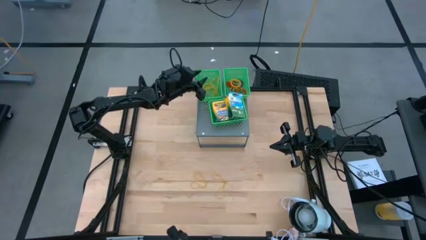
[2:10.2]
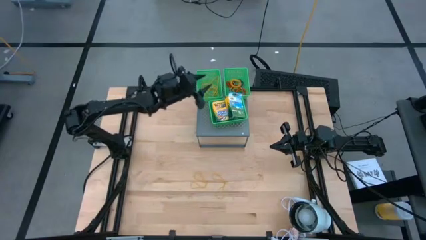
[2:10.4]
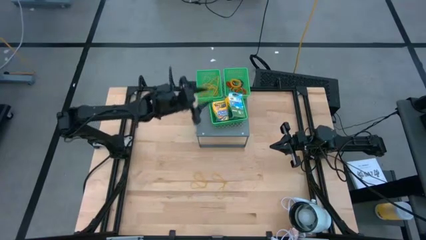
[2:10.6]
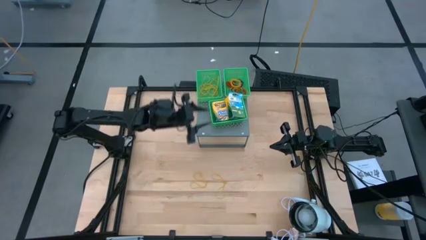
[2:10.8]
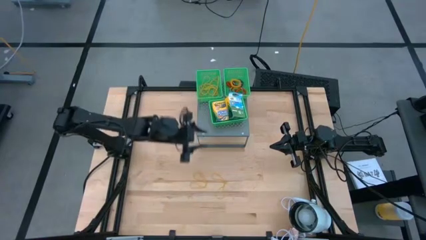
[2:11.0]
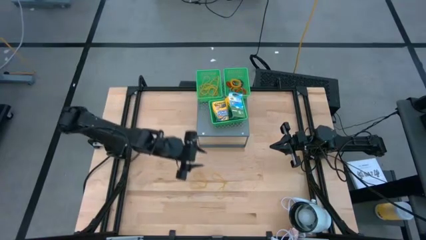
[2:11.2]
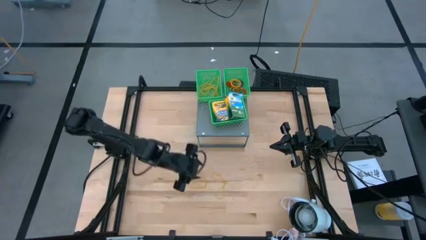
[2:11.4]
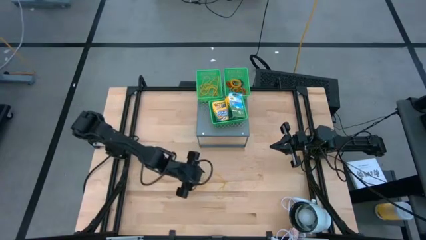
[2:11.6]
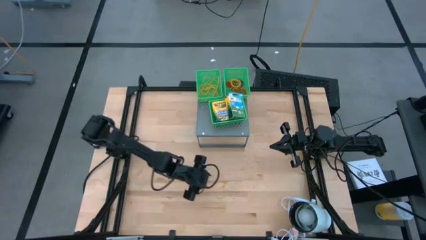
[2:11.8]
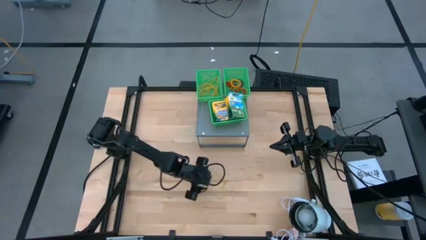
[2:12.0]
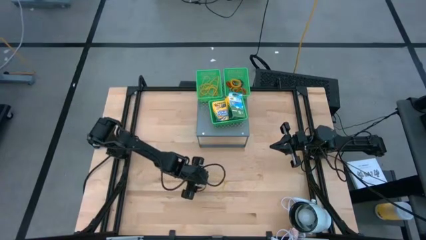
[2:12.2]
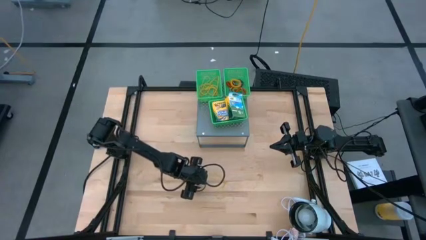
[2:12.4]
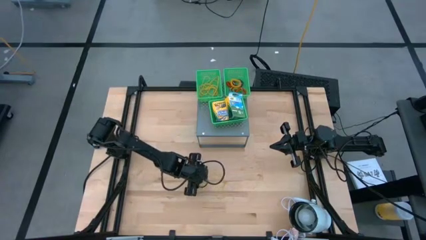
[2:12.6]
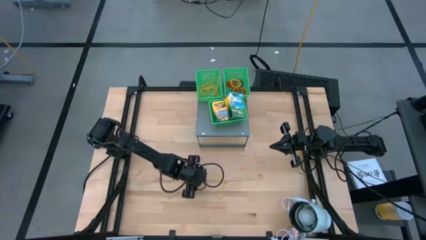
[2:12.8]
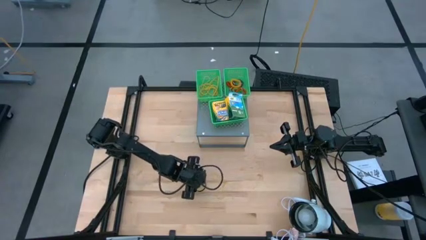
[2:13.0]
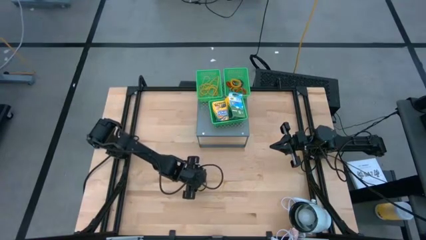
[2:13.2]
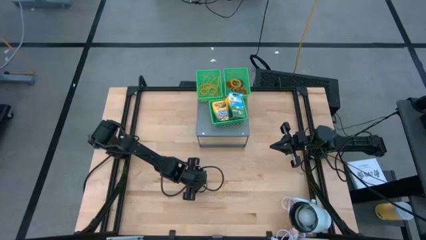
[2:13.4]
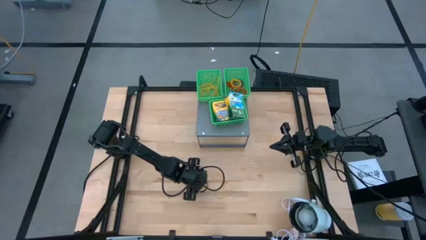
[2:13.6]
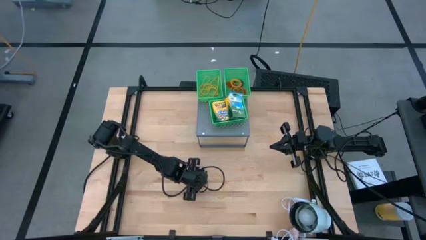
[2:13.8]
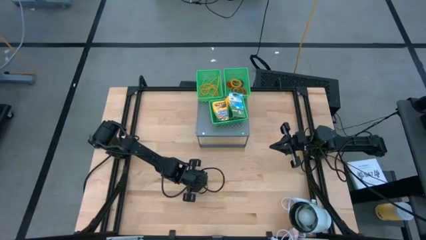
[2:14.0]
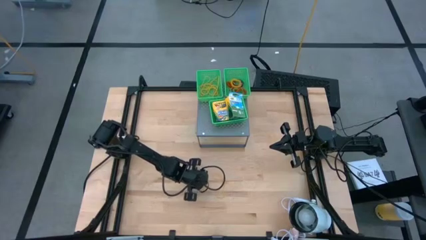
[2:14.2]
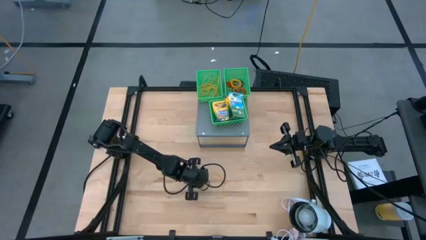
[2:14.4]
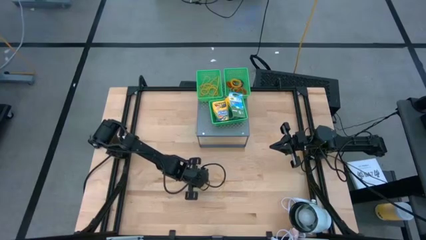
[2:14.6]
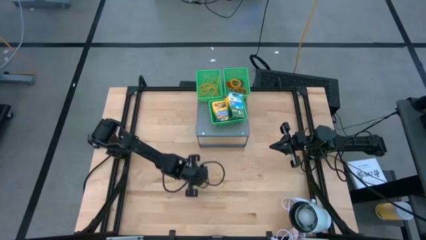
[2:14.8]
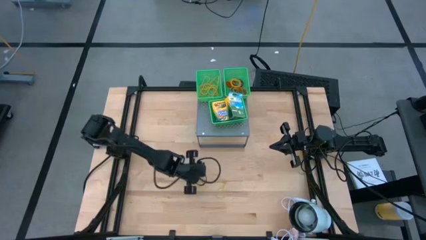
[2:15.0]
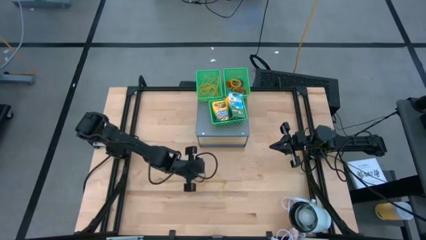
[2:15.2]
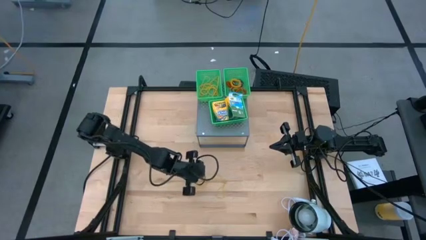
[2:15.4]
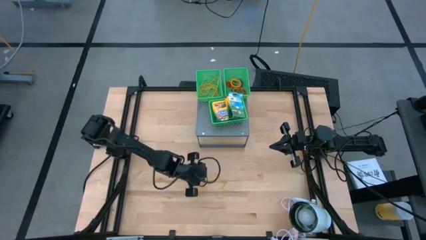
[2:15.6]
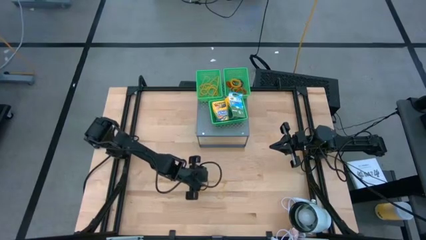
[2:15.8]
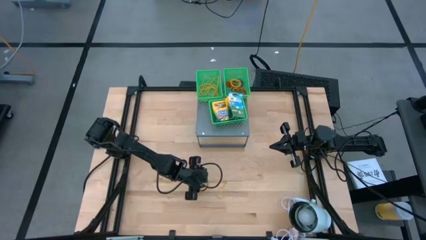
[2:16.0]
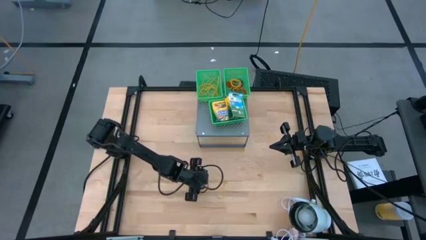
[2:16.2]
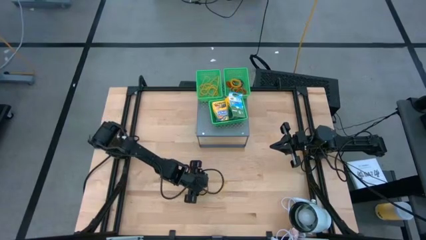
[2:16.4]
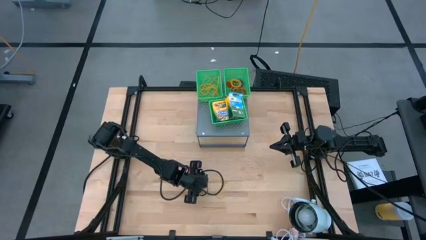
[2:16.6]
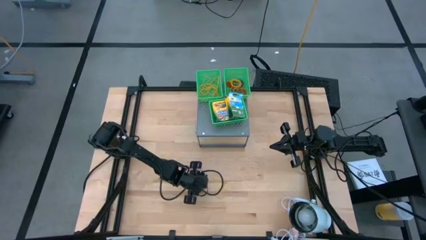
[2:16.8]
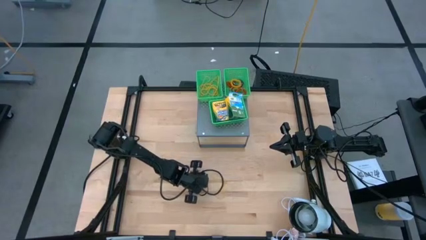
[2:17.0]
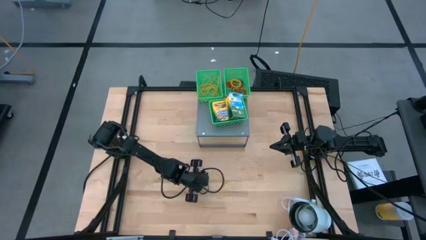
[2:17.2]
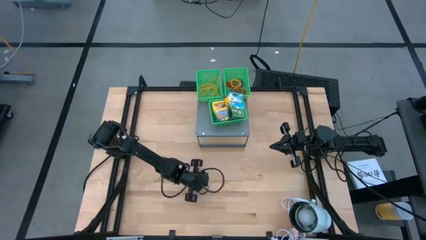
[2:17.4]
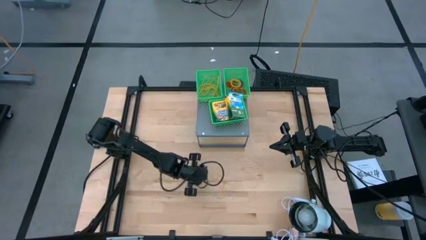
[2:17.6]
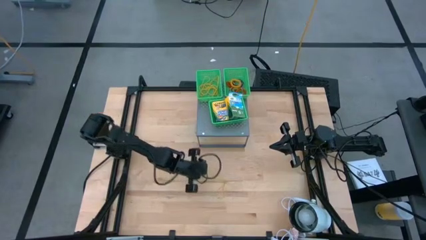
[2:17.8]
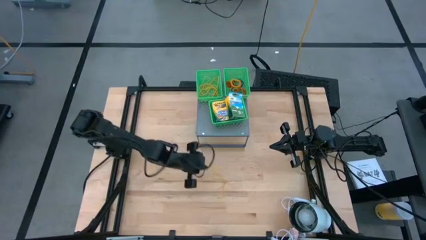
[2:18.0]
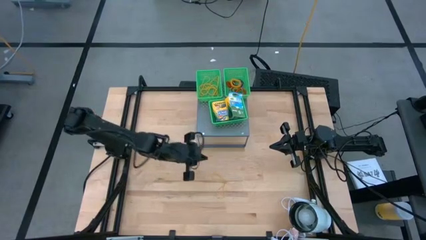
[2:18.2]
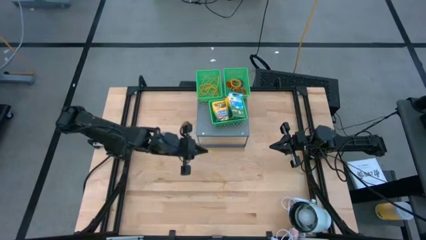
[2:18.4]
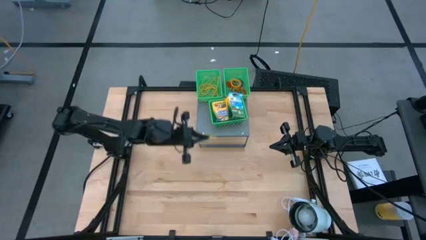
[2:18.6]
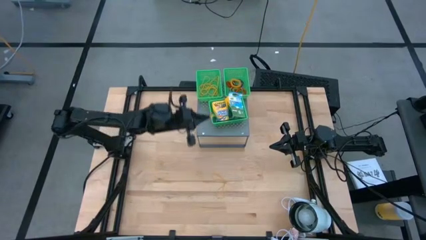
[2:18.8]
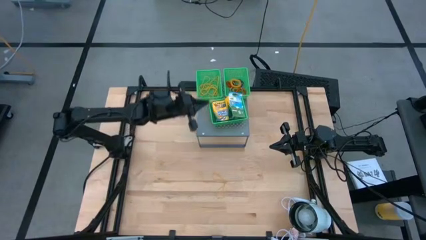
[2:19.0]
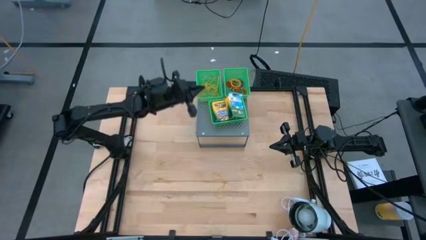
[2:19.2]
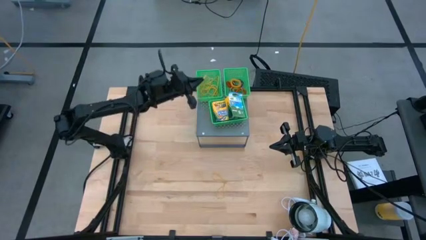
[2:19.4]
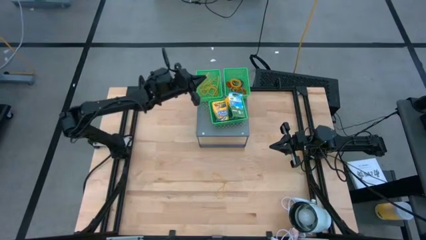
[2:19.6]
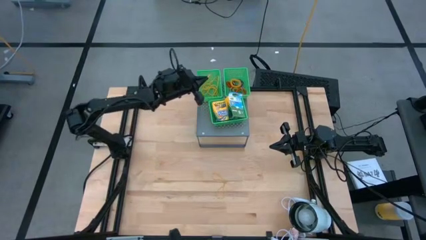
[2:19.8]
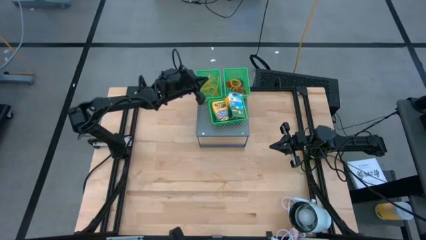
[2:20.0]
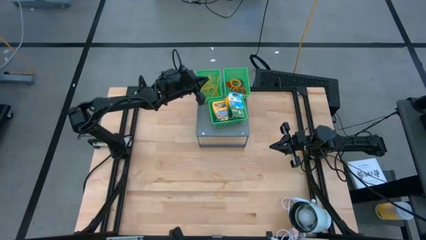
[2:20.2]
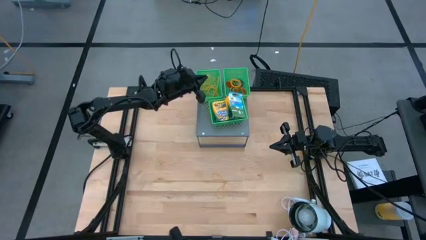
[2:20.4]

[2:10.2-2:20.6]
Task: Pick & Place Office Desk Supplies
Put the yellow rubber band into the left green bin on the shelf
